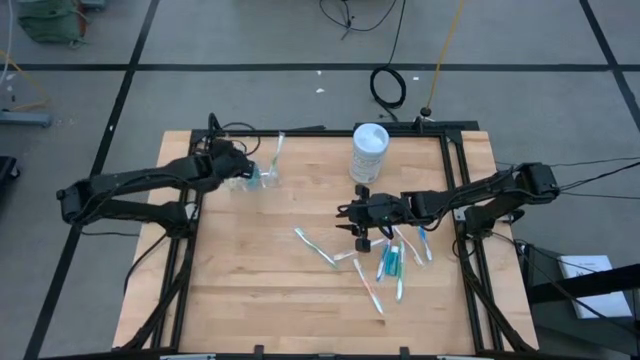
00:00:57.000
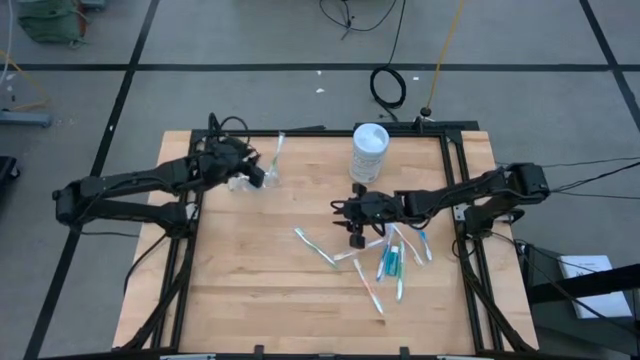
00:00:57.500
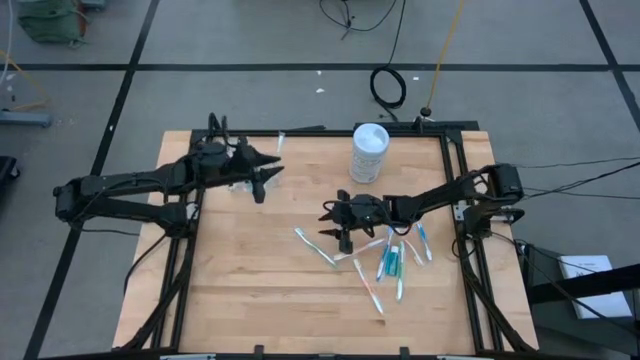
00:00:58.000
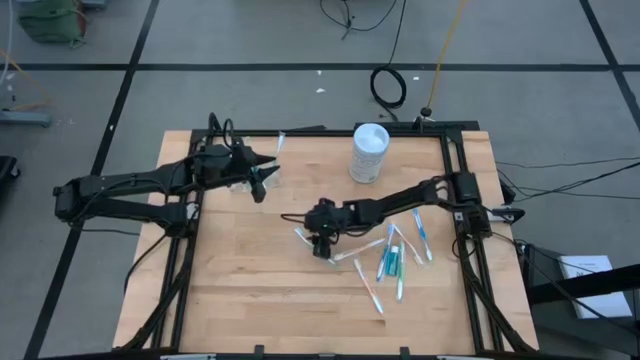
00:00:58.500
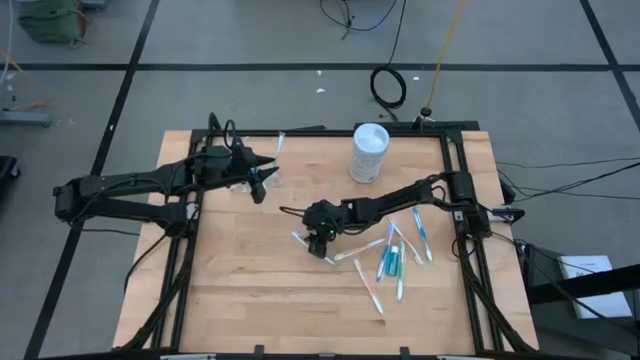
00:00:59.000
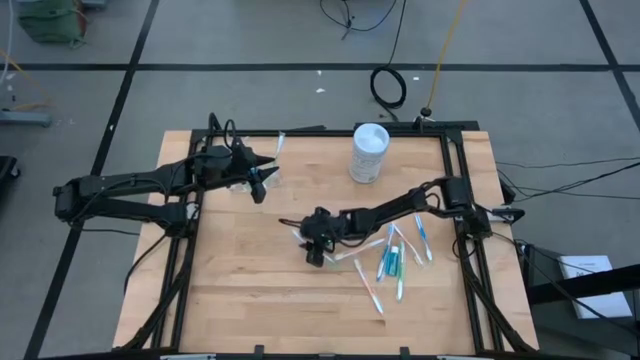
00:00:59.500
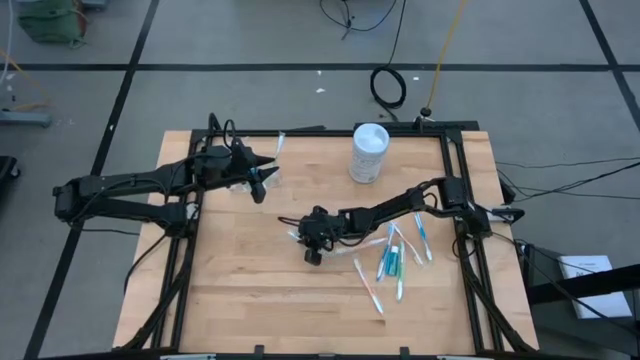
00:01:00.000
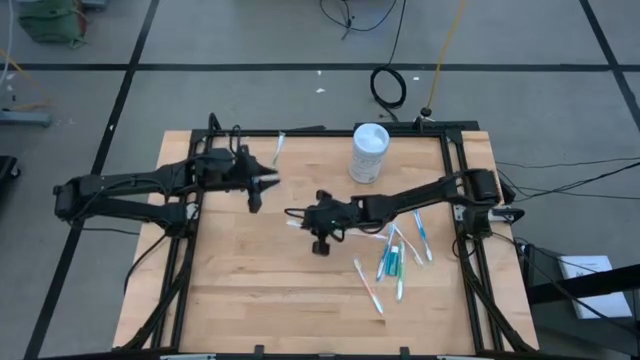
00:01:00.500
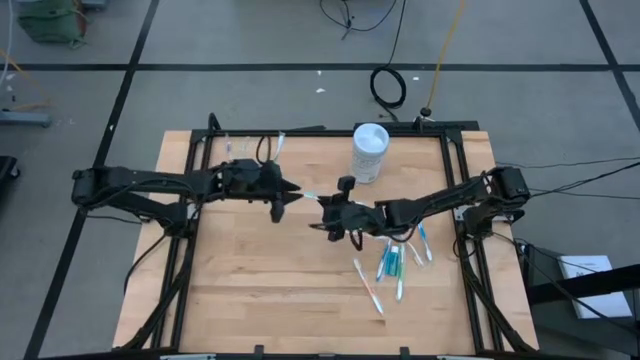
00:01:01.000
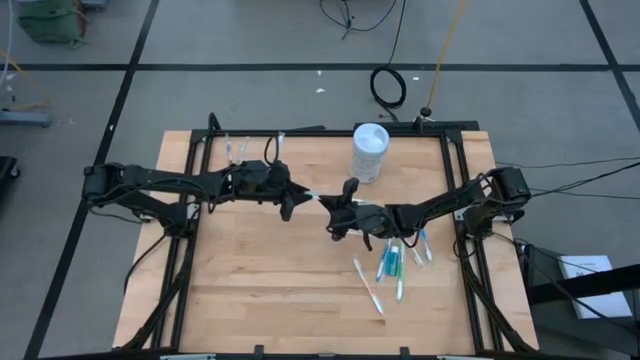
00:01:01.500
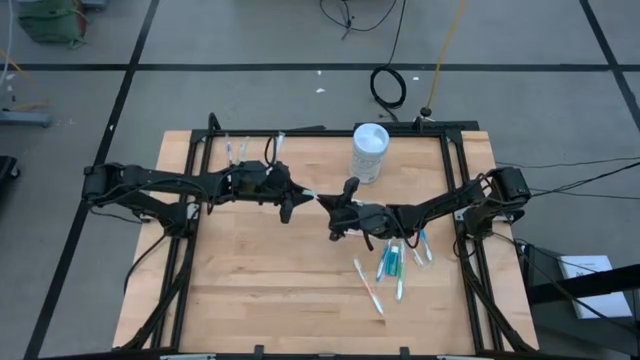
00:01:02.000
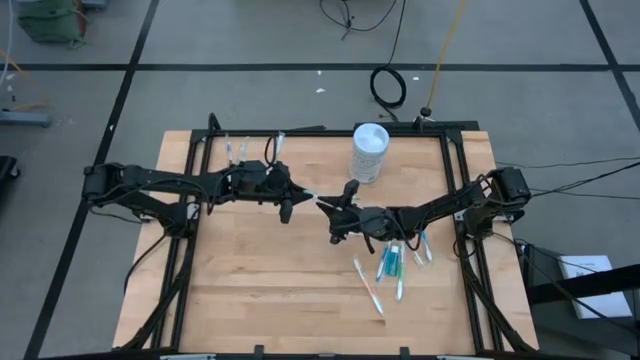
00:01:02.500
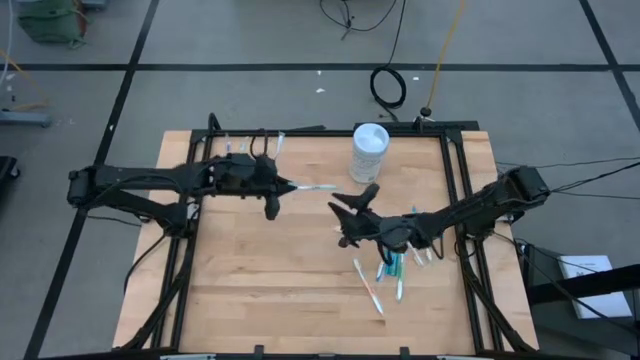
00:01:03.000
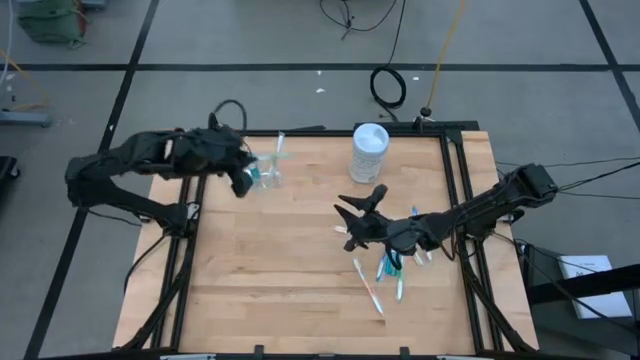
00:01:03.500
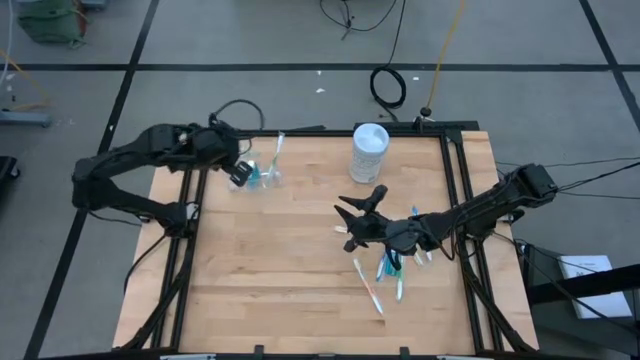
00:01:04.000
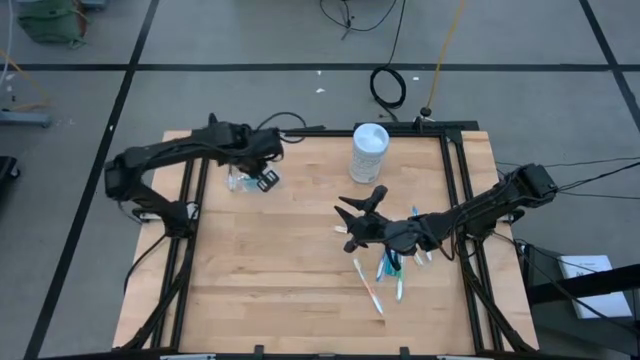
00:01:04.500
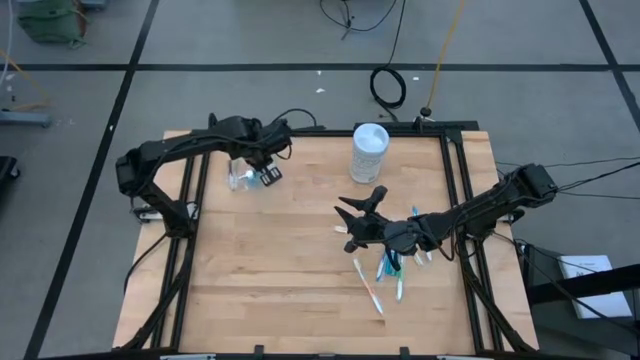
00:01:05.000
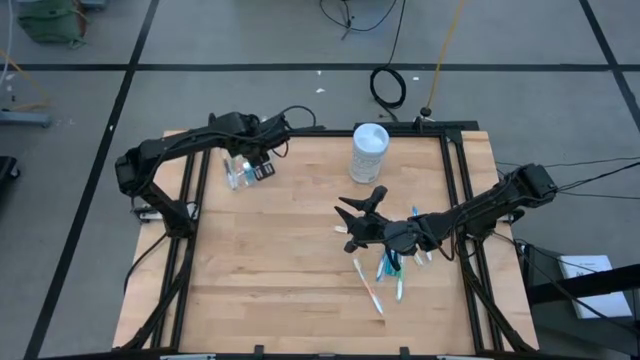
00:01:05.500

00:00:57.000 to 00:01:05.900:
Task: Pick & Place toothbrushing station
Put the green toothbrush into the transparent organizer

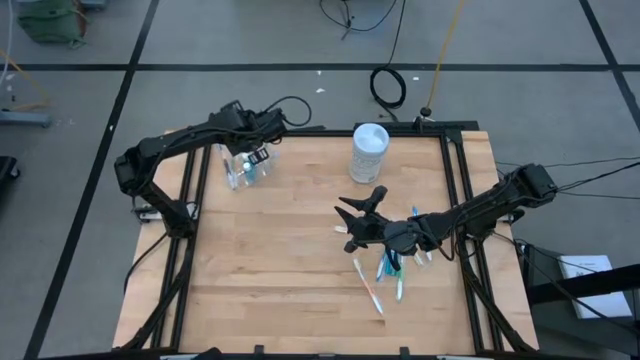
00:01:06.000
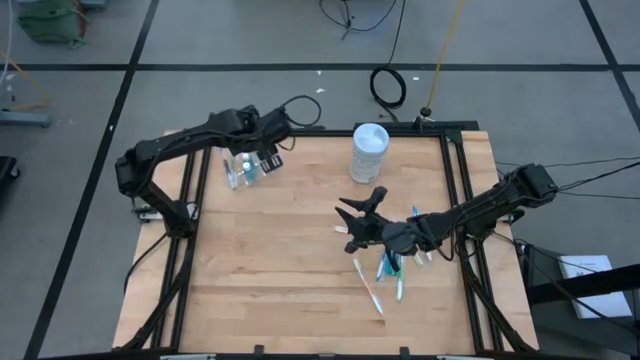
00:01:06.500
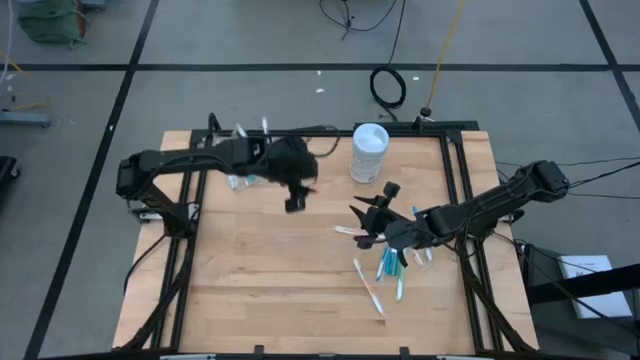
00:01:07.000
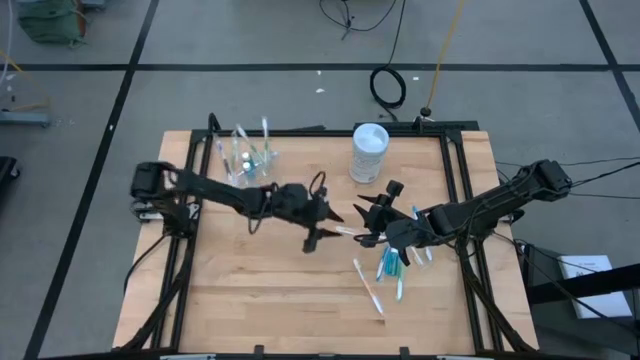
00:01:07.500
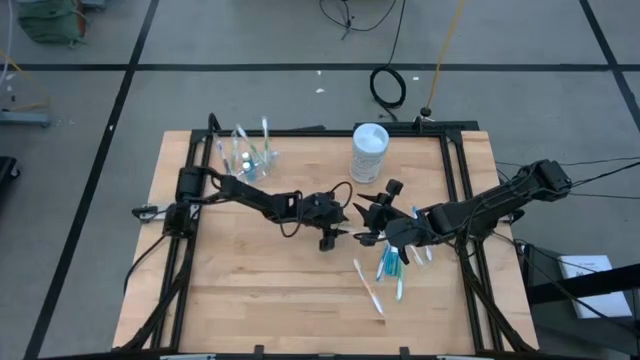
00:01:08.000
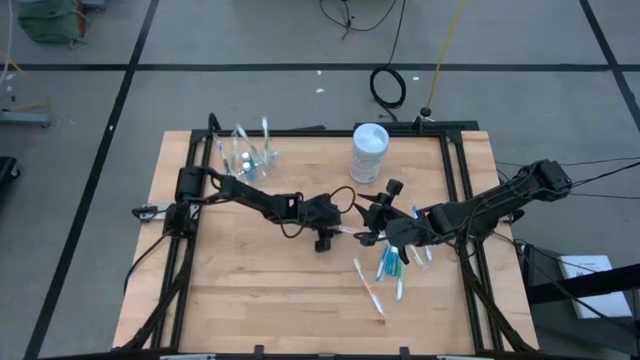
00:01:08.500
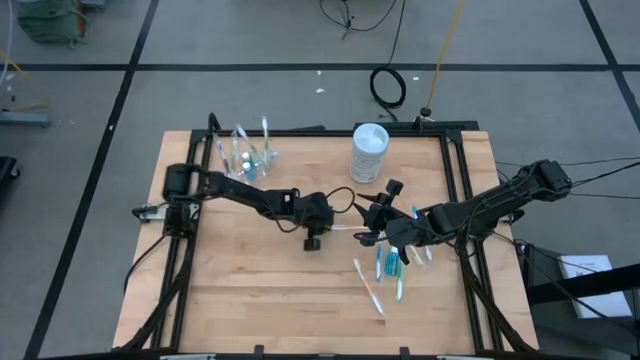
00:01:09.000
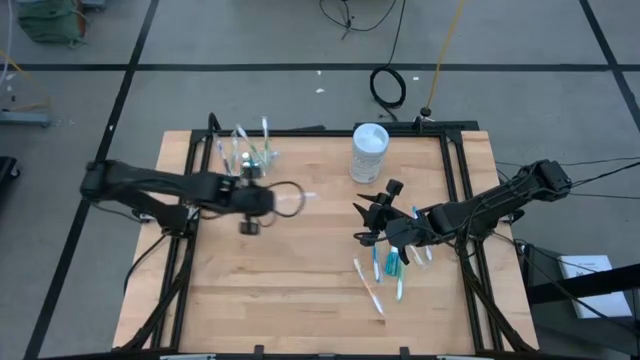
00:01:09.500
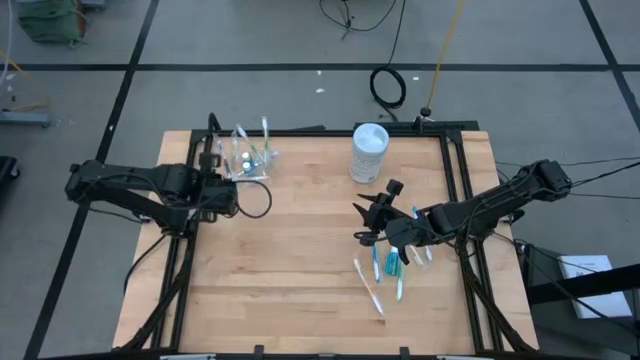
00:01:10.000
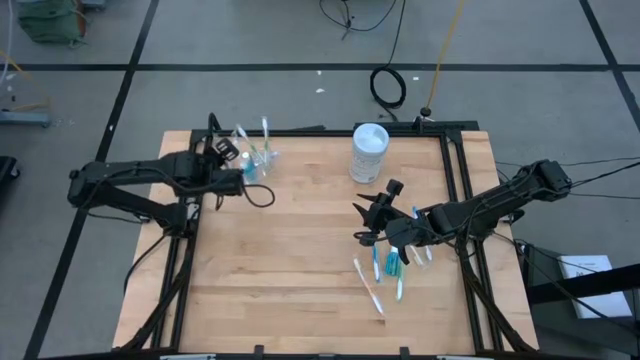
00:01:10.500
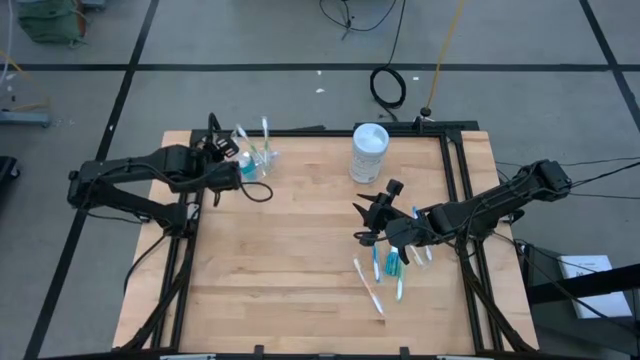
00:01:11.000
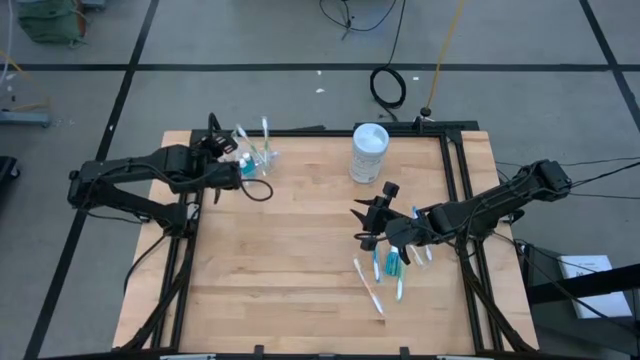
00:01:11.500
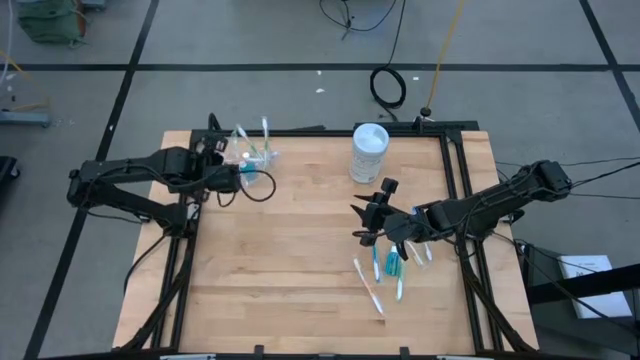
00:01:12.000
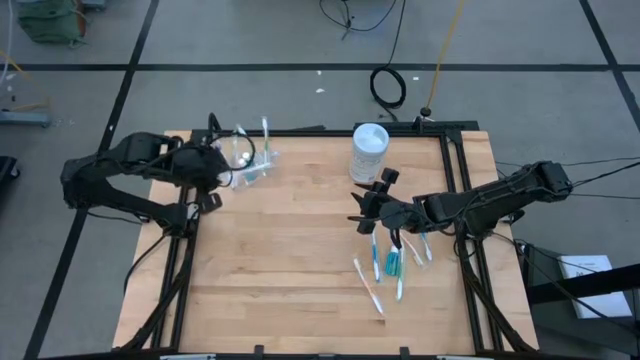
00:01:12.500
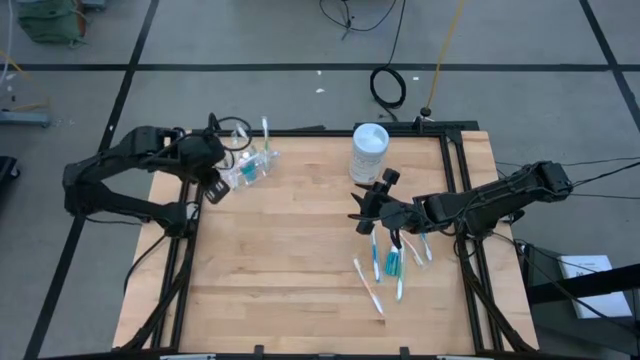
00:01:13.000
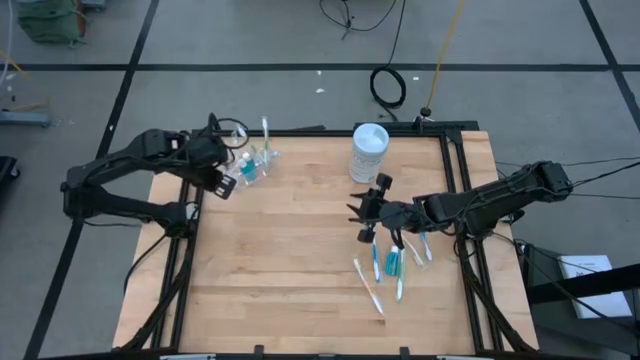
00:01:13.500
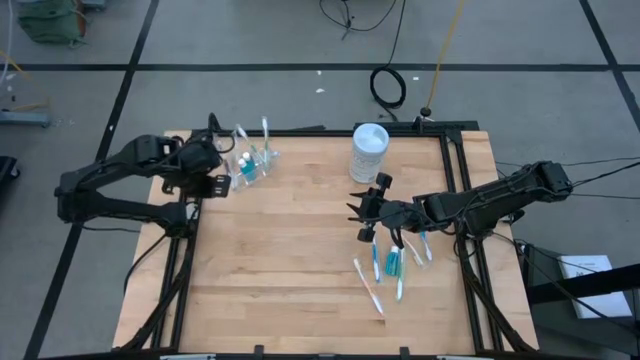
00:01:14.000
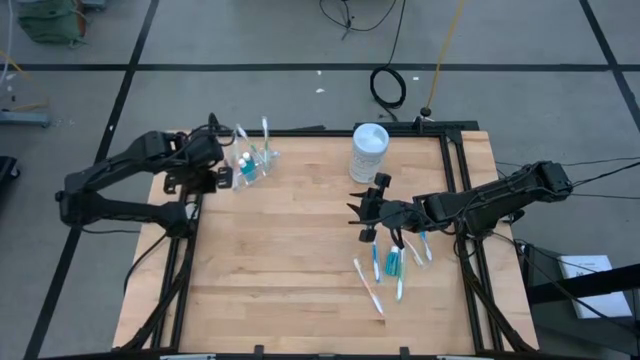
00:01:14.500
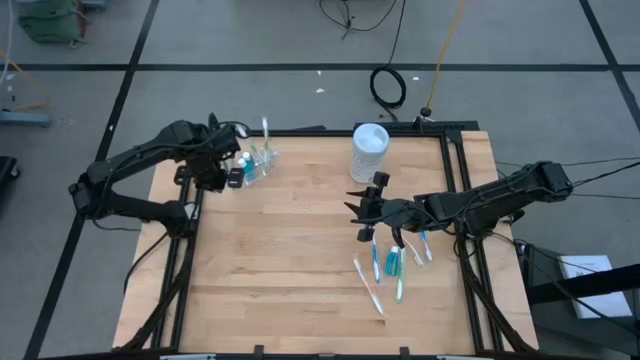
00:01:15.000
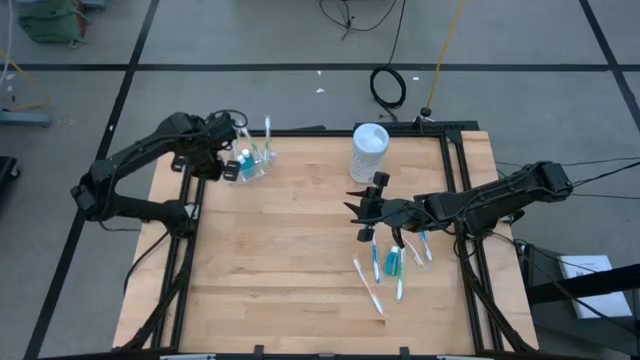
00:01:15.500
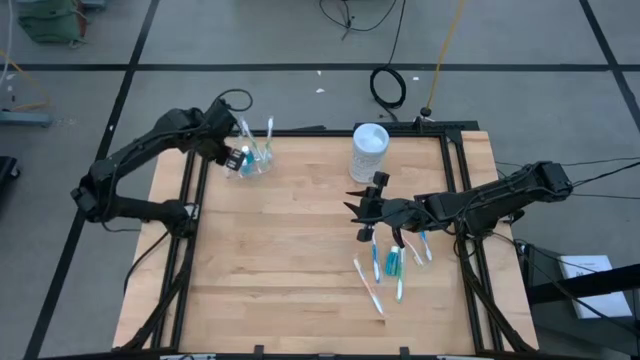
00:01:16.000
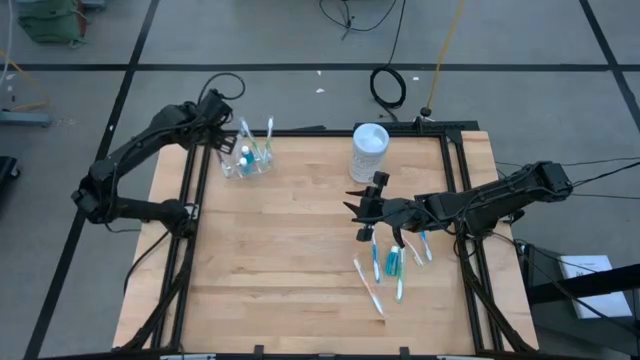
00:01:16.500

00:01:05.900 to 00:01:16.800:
Put the orange toothbrush into the transparent organizer

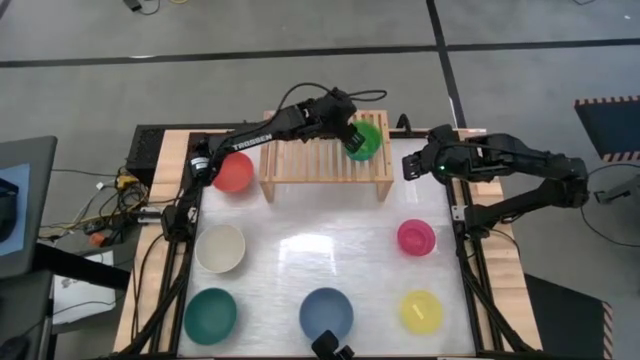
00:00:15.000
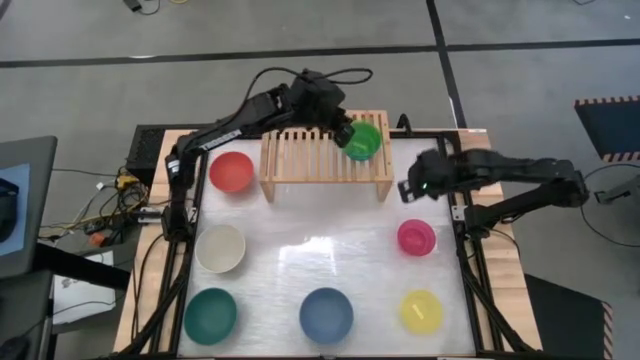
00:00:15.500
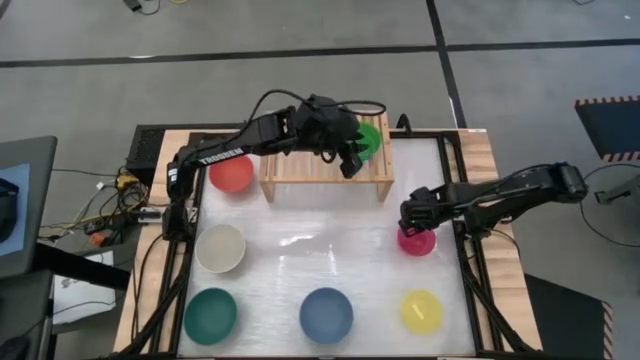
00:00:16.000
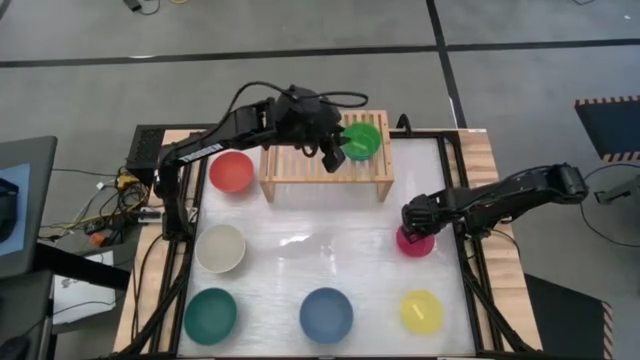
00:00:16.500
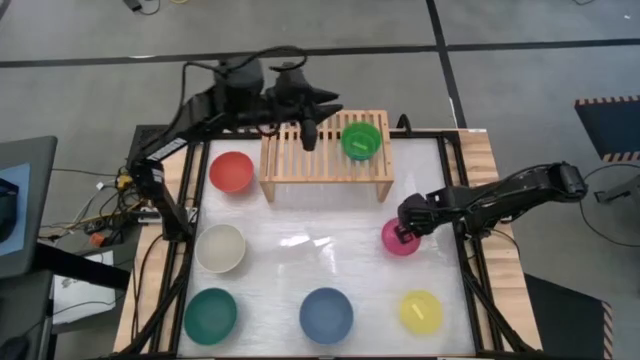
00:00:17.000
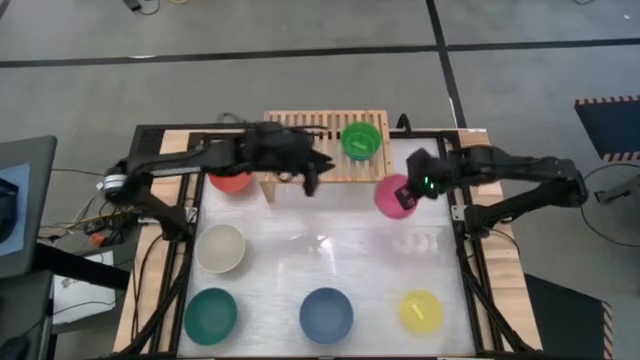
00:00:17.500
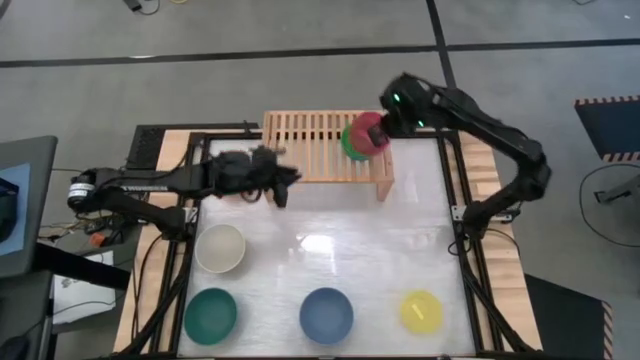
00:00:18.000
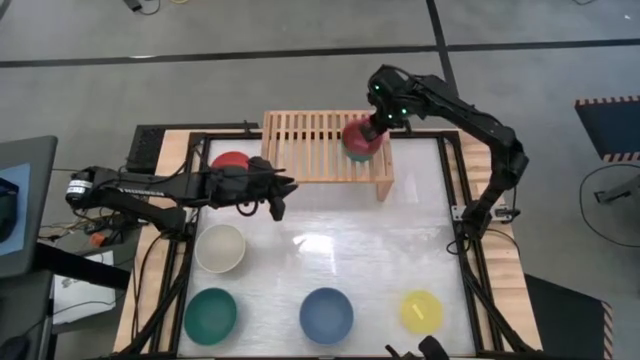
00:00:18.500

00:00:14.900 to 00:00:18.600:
Task: Place and stack bowls onto a shelf
Stack the small red transparent bowl on top of the small green transparent bowl on the shelf
